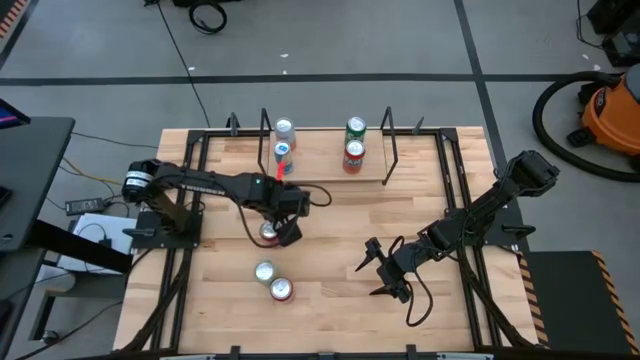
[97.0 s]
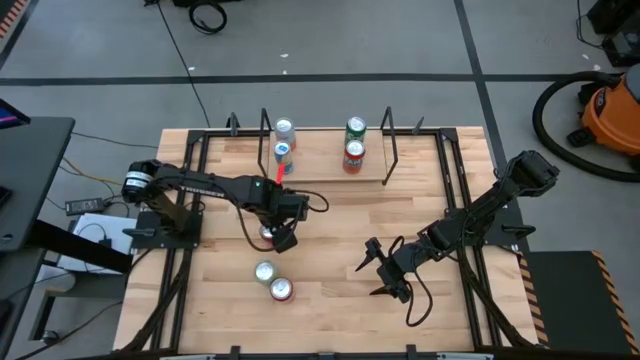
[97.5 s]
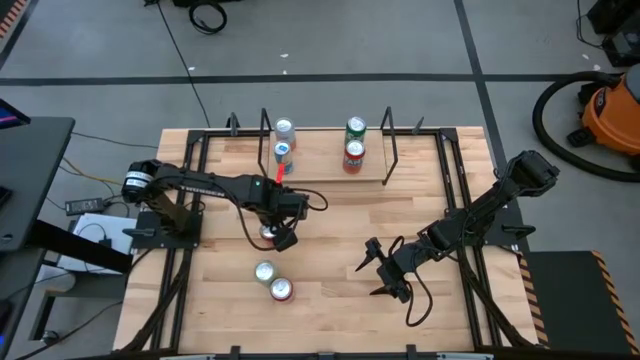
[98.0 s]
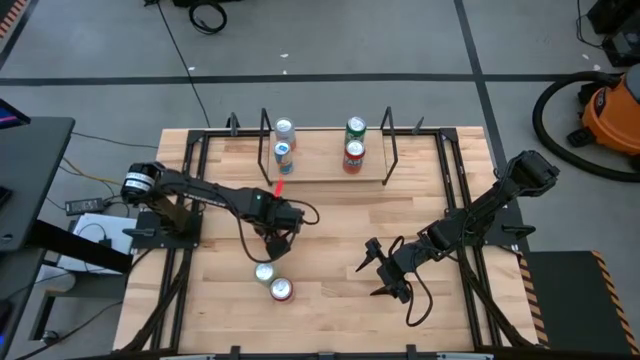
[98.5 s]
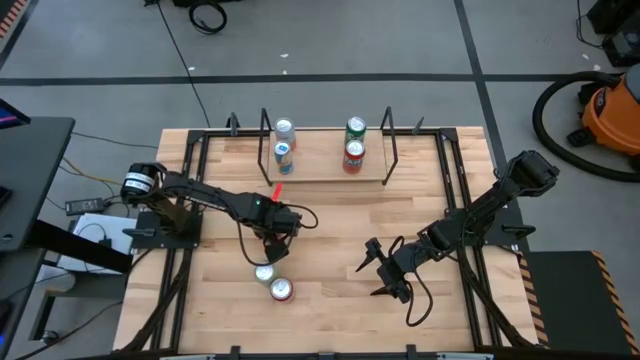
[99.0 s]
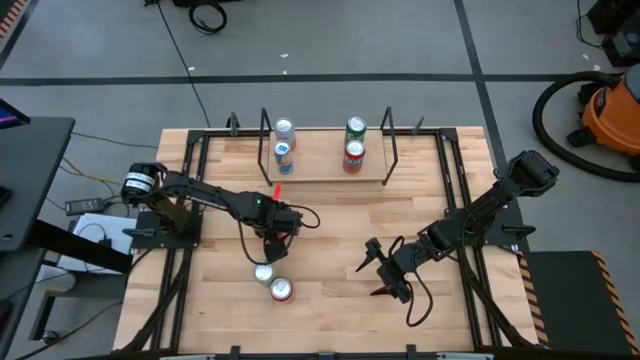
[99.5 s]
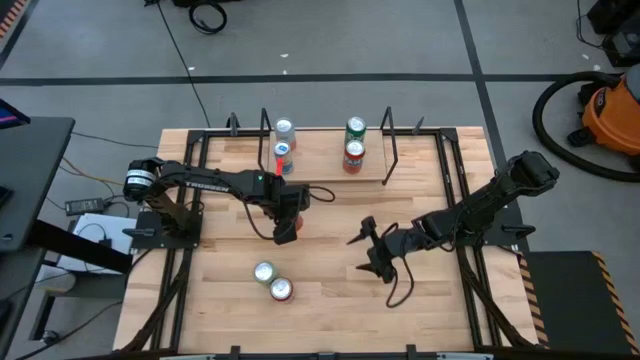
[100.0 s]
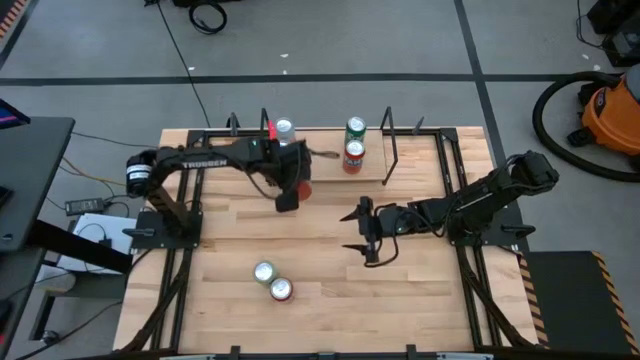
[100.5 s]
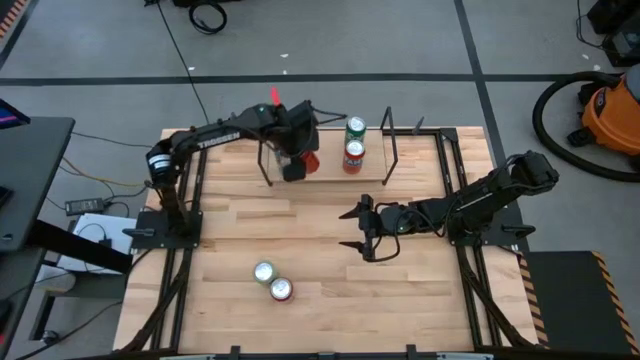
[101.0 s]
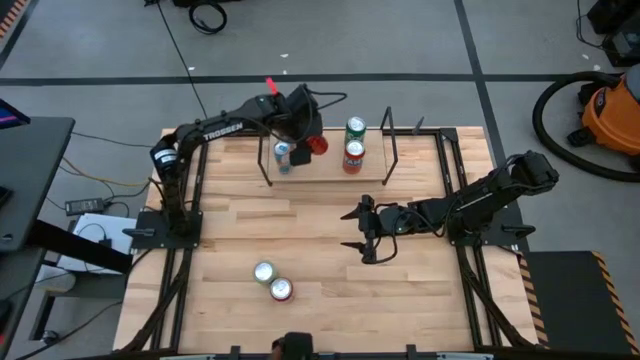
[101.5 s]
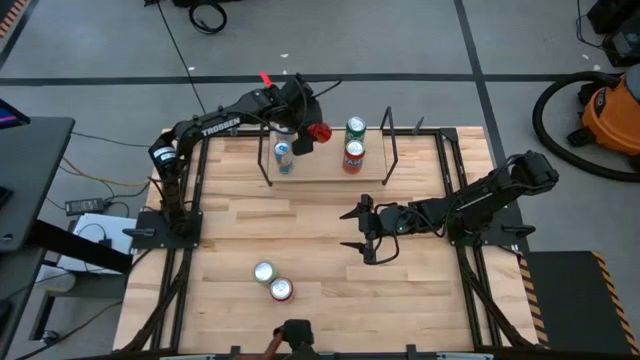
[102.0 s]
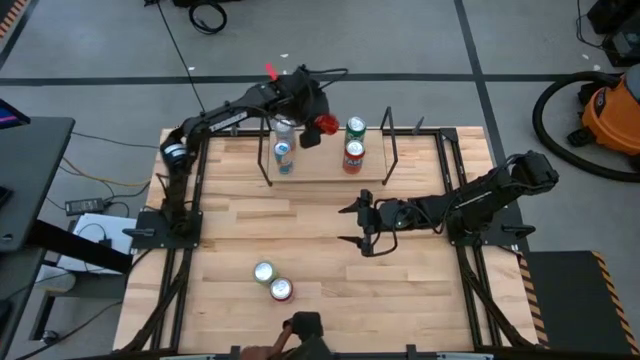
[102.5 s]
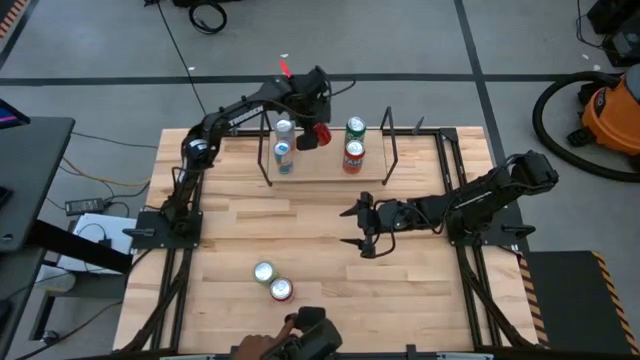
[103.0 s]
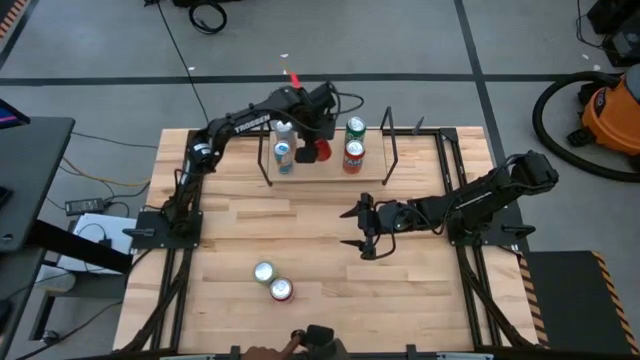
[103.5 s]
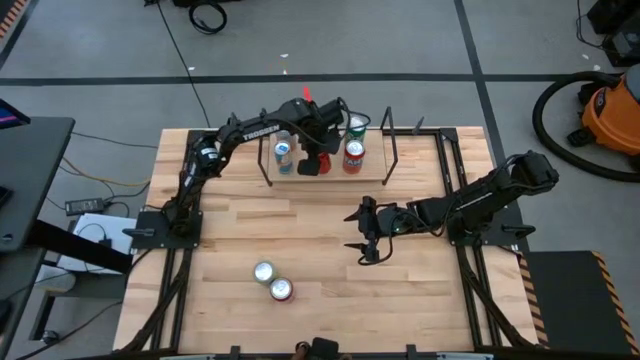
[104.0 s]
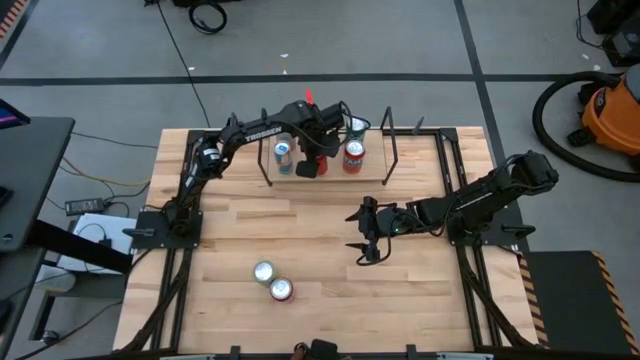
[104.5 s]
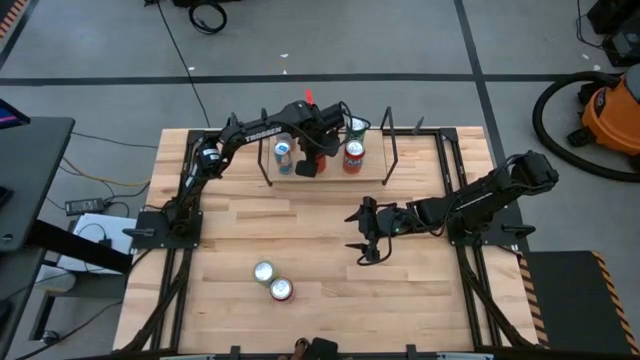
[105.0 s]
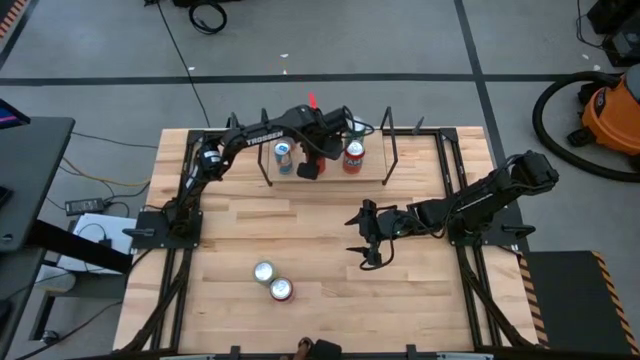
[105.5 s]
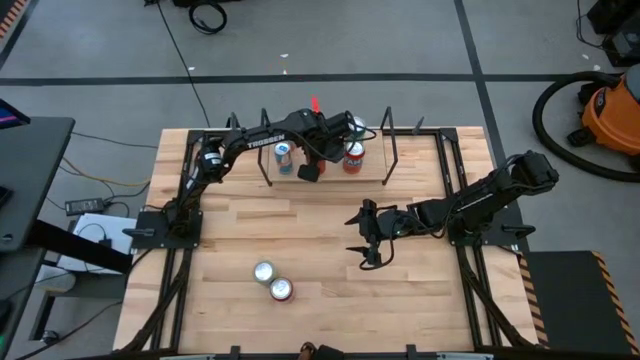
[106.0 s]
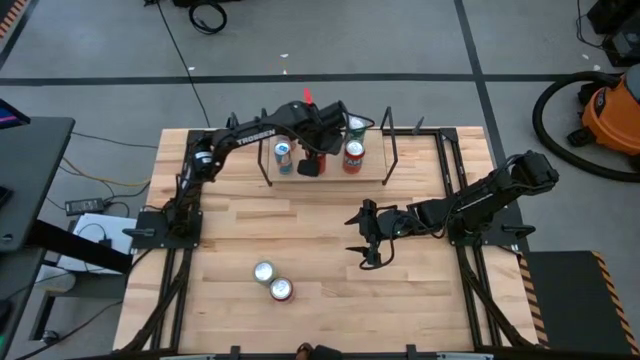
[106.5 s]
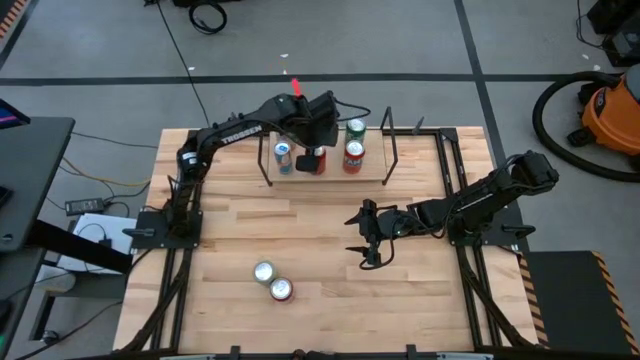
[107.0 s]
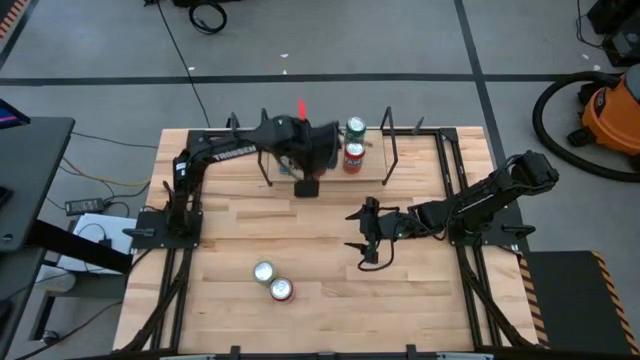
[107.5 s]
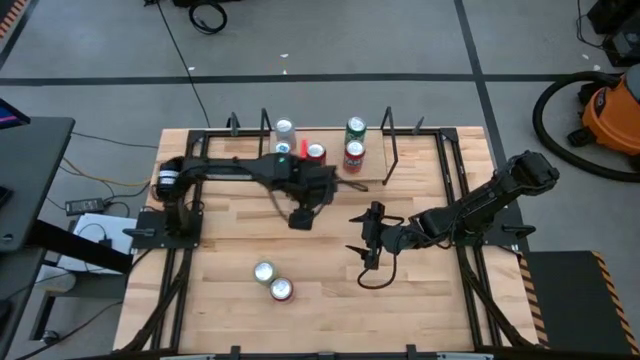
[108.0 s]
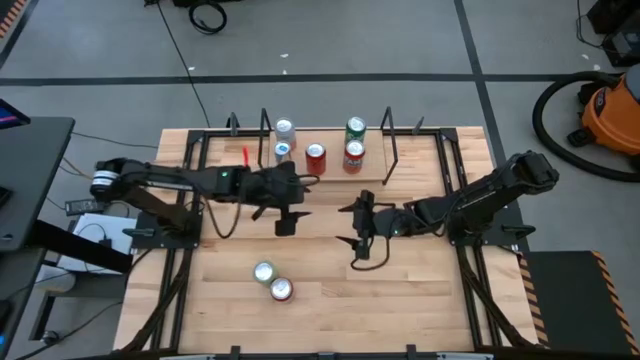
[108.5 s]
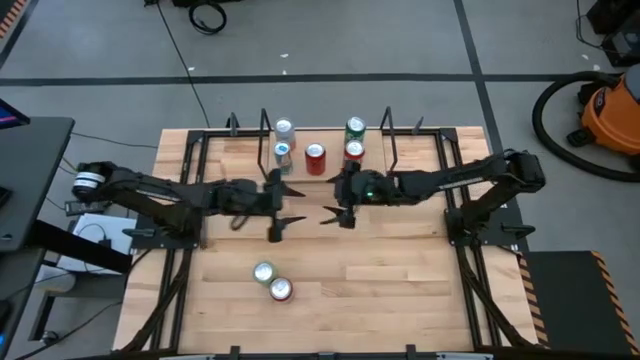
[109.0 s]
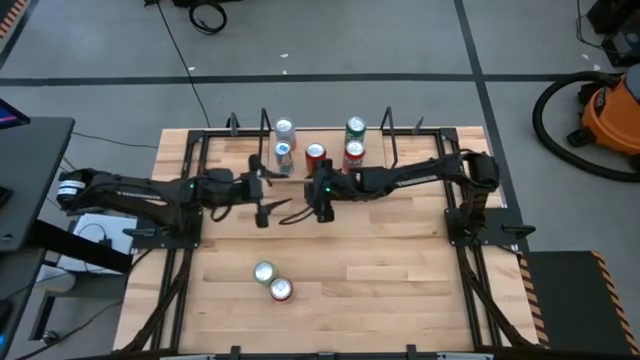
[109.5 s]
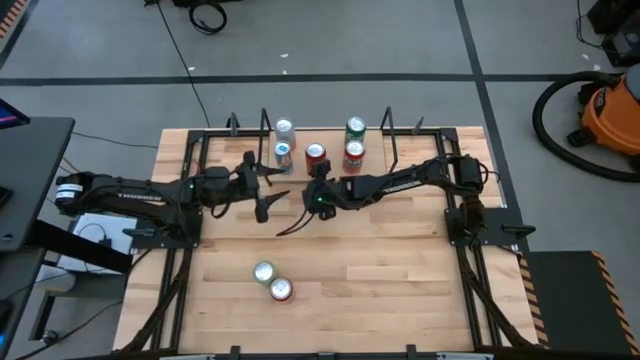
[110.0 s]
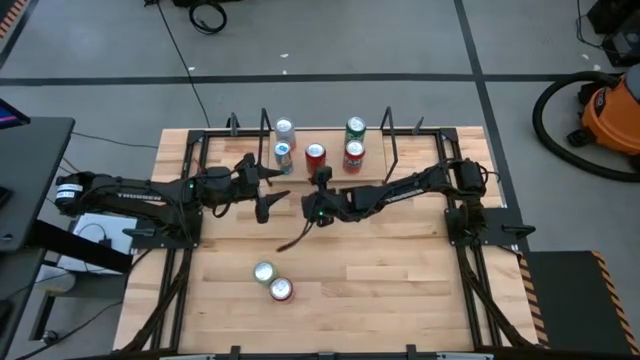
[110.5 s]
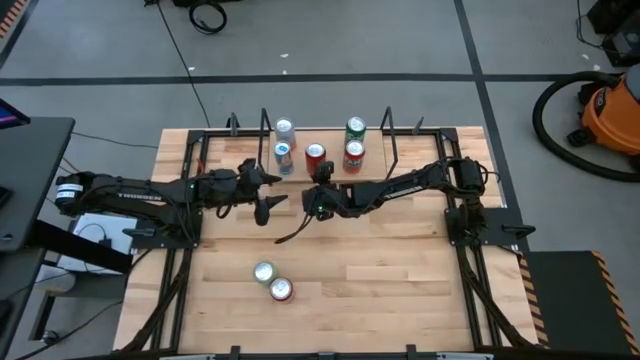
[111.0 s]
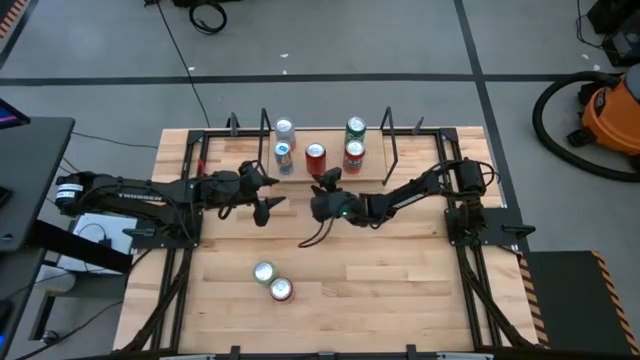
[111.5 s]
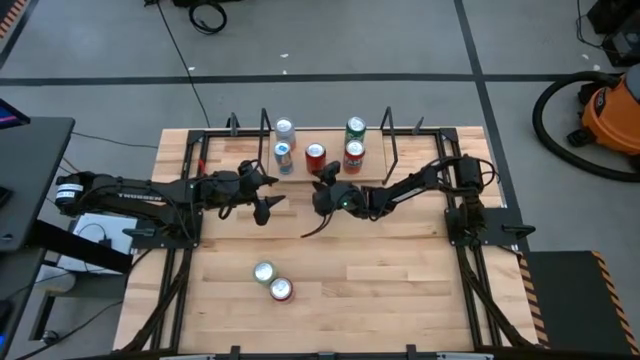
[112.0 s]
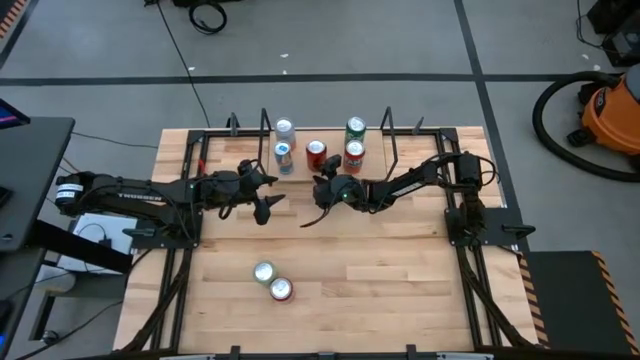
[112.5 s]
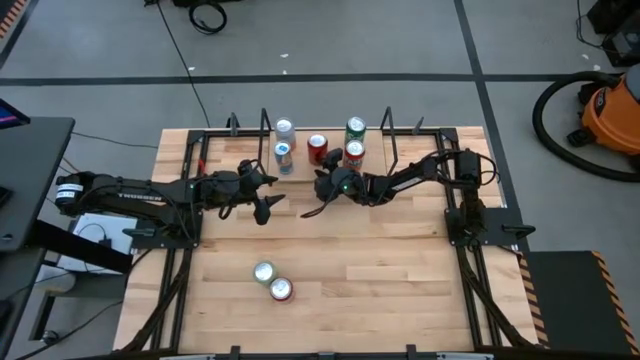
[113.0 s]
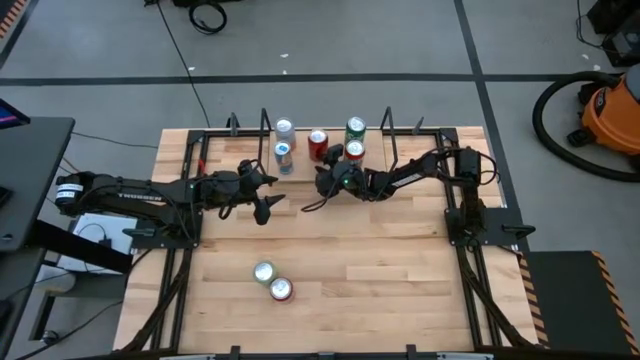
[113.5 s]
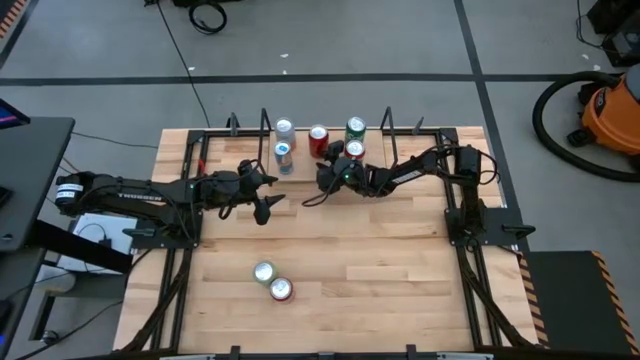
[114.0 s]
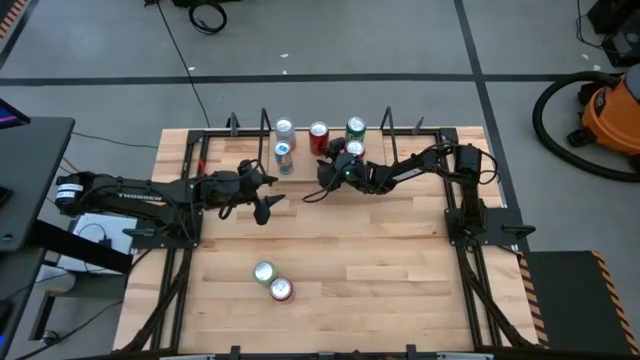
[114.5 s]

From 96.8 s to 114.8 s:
Task: Place canned beverage on shelf
Put the red-black soda can on the shelf

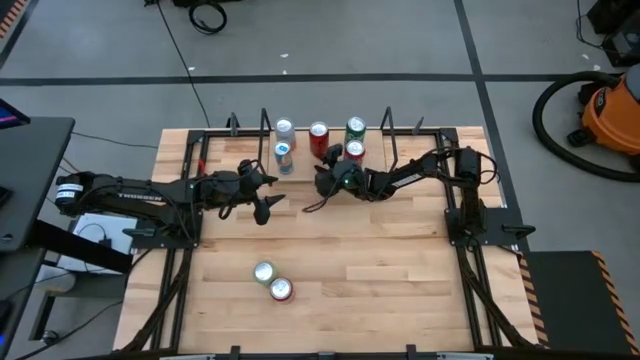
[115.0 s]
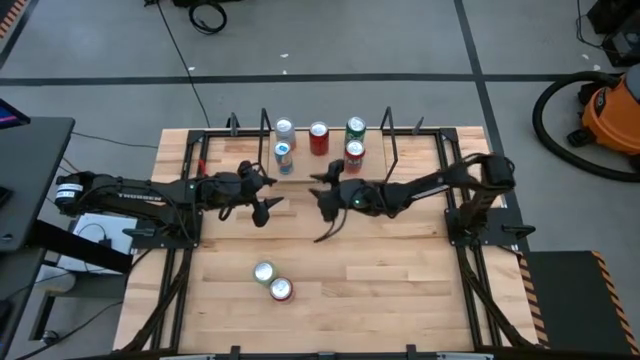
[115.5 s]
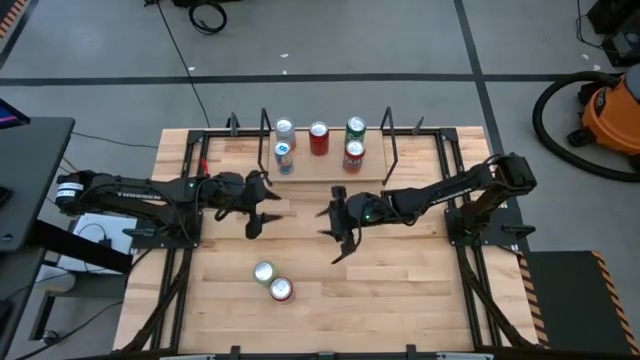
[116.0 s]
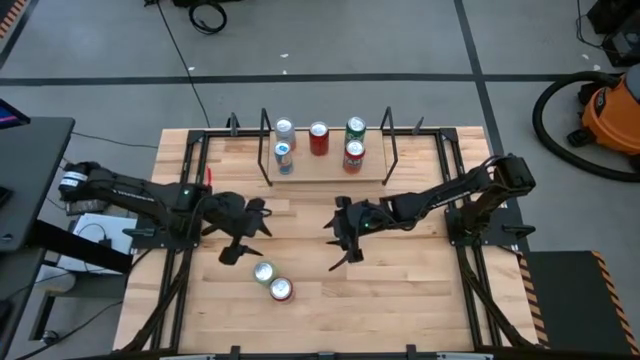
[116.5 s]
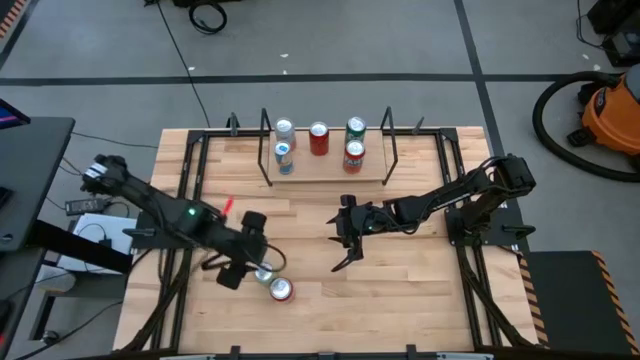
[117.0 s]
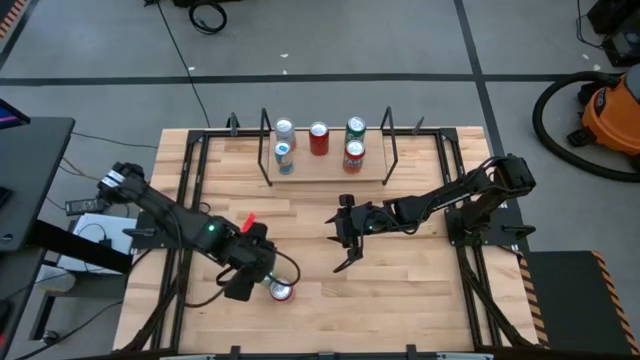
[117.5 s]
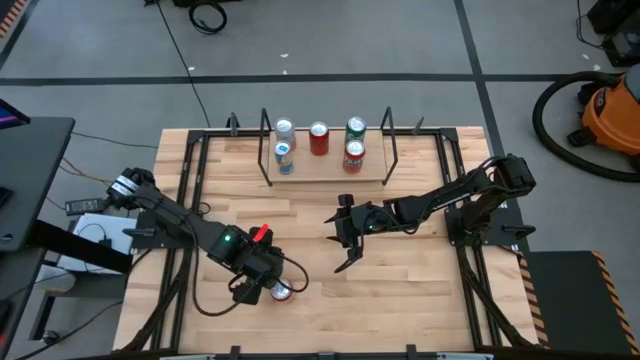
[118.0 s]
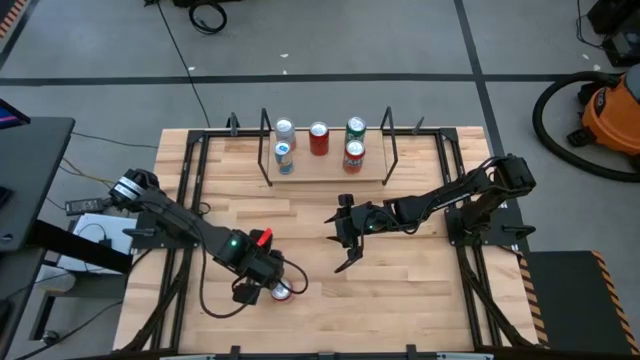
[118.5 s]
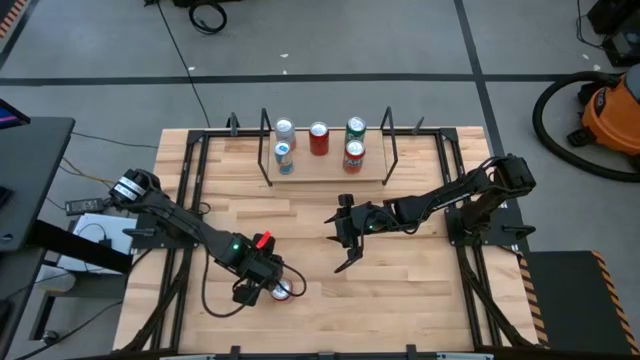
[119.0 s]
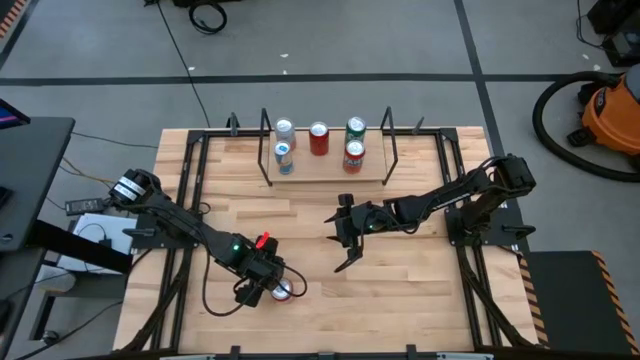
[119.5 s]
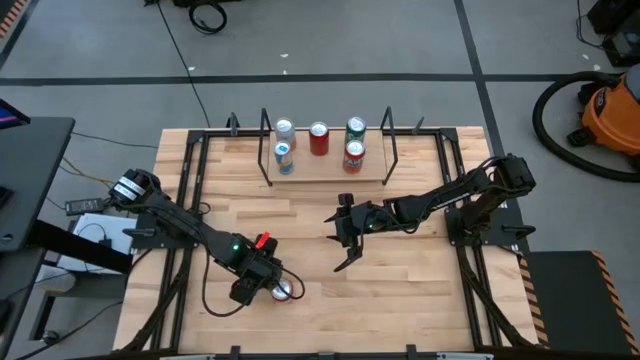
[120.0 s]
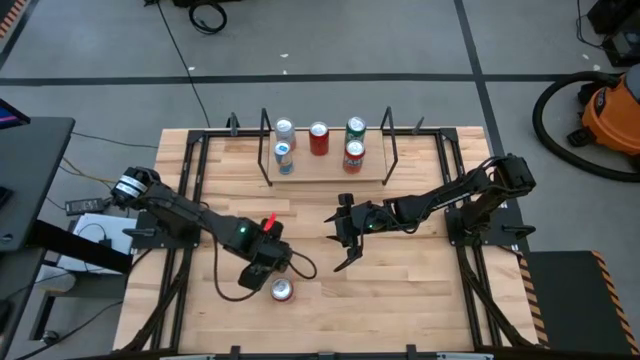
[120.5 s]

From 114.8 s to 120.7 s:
Put the light green soda can on the shelf
